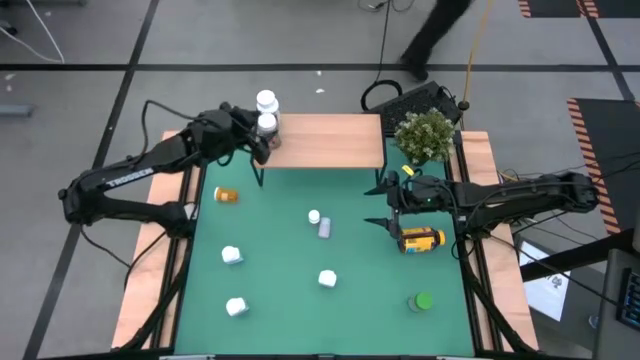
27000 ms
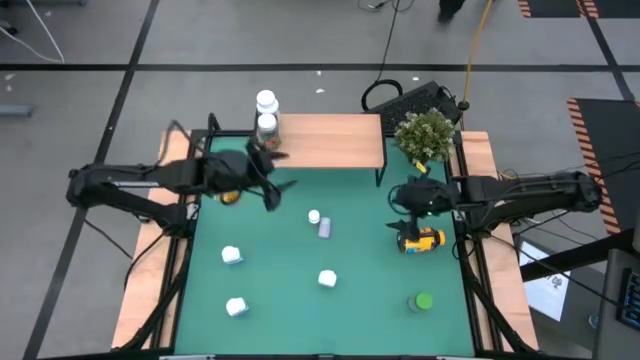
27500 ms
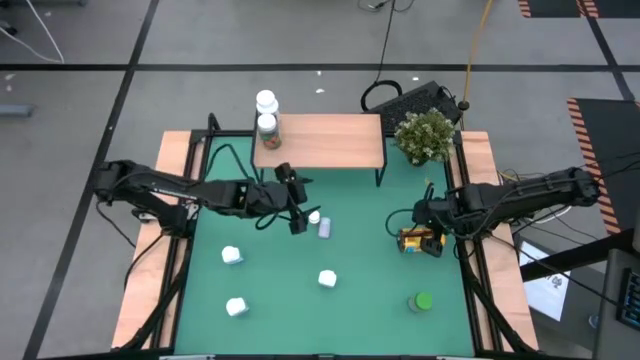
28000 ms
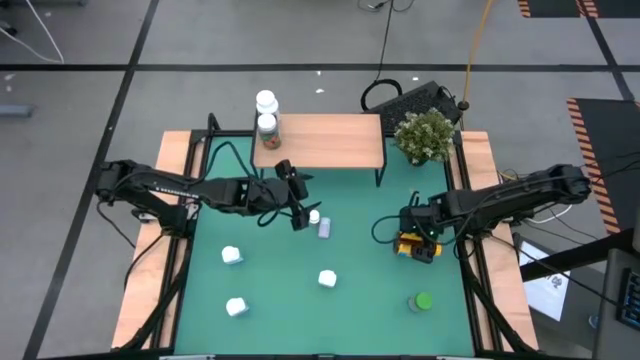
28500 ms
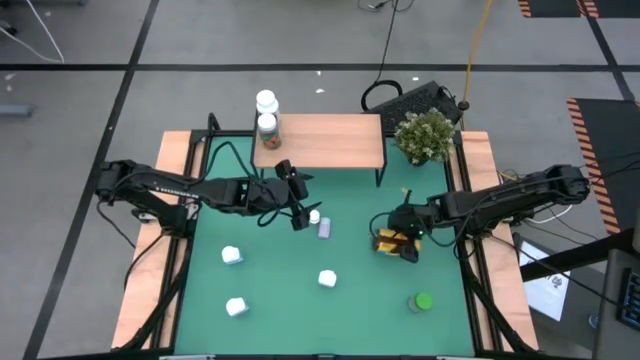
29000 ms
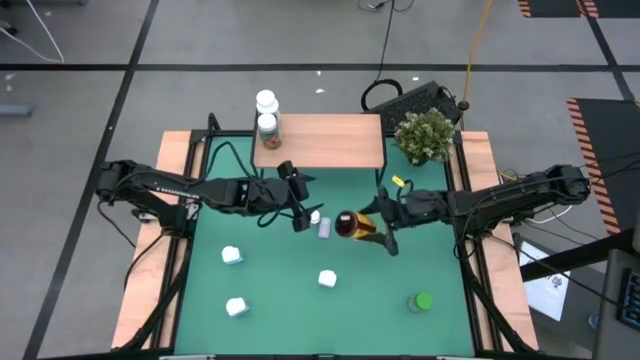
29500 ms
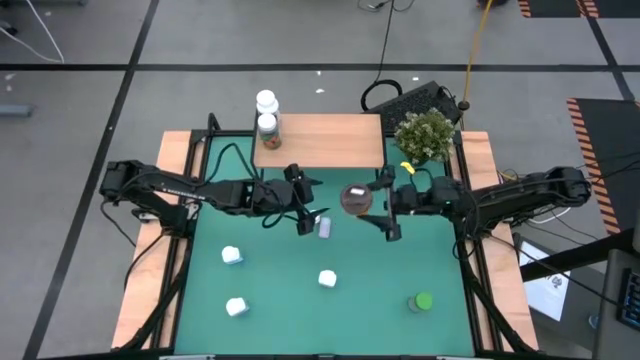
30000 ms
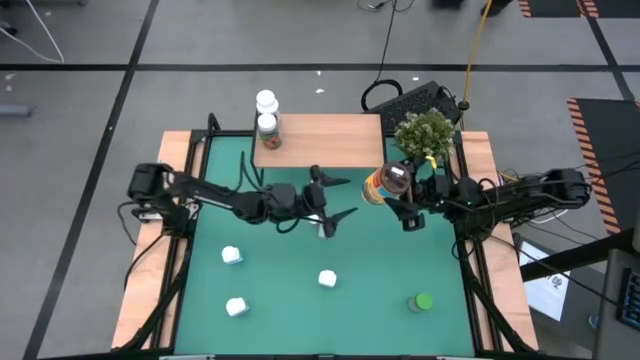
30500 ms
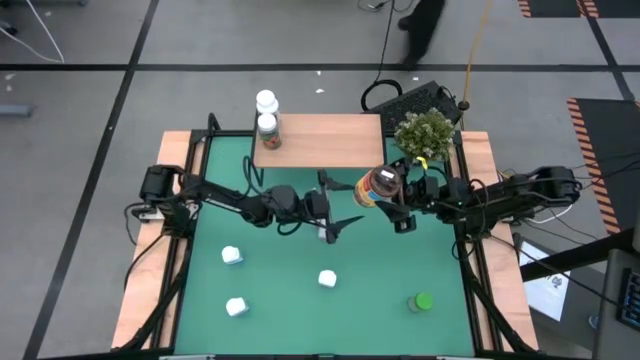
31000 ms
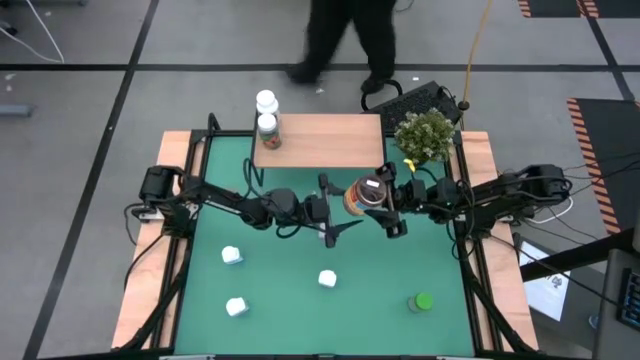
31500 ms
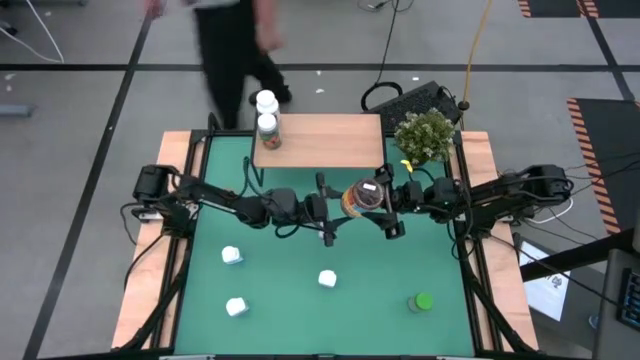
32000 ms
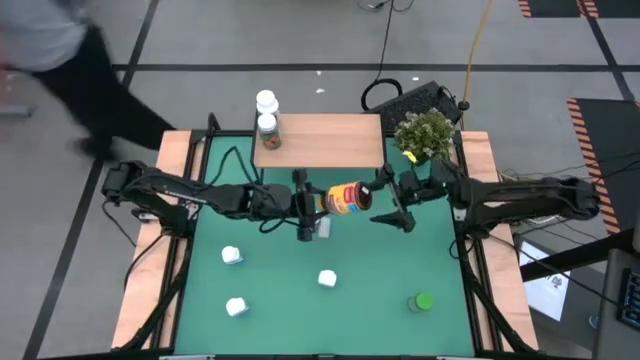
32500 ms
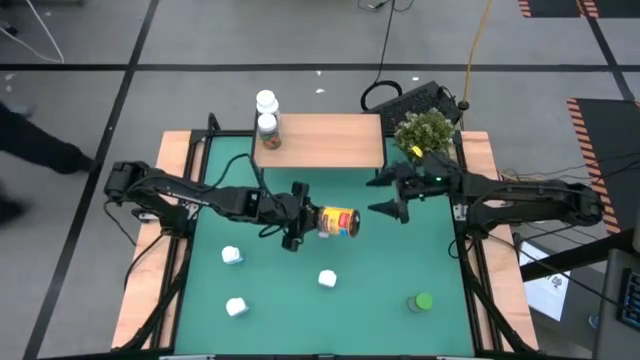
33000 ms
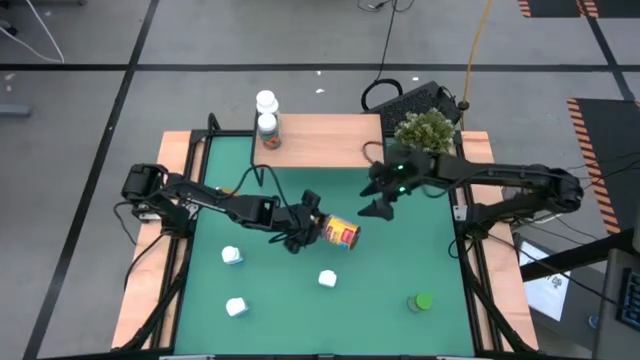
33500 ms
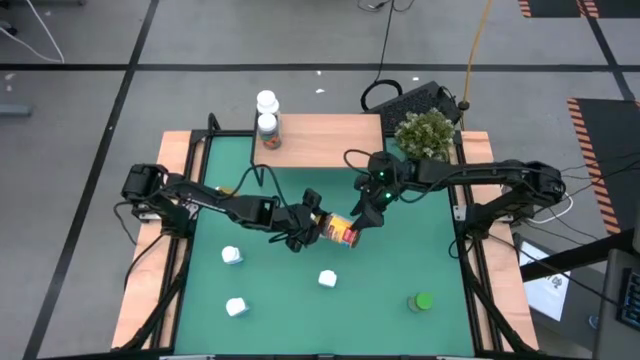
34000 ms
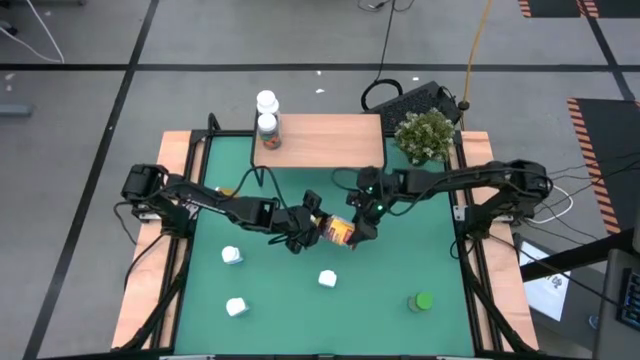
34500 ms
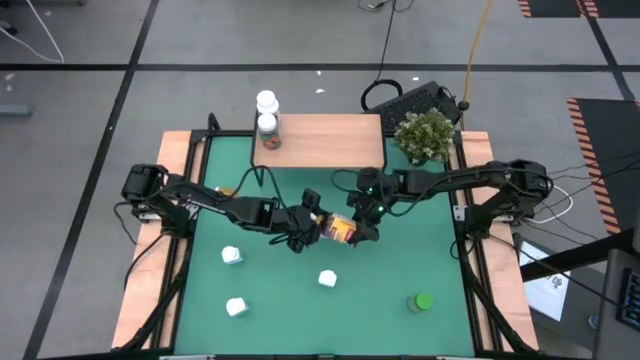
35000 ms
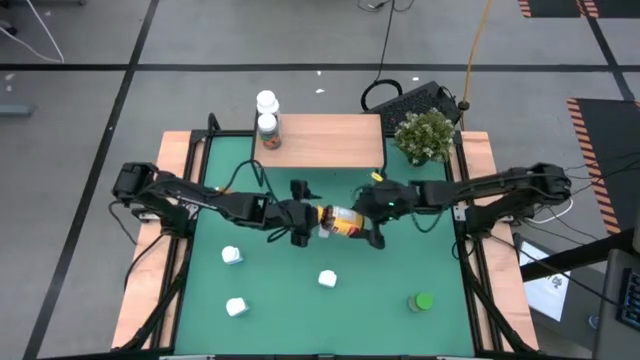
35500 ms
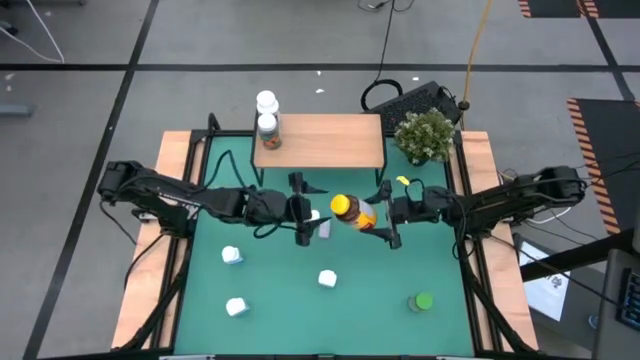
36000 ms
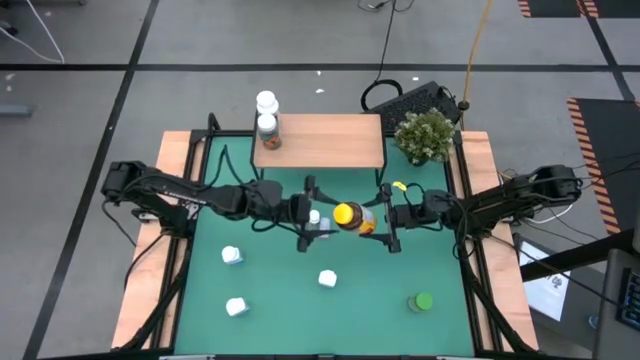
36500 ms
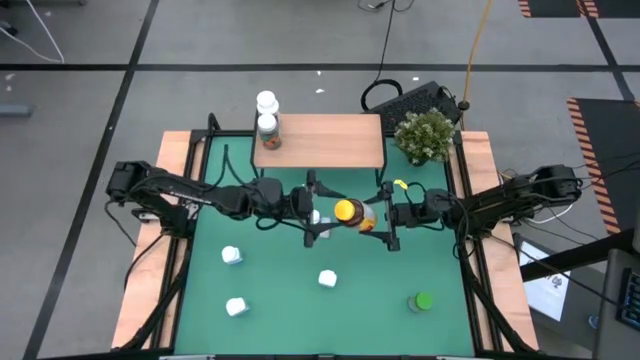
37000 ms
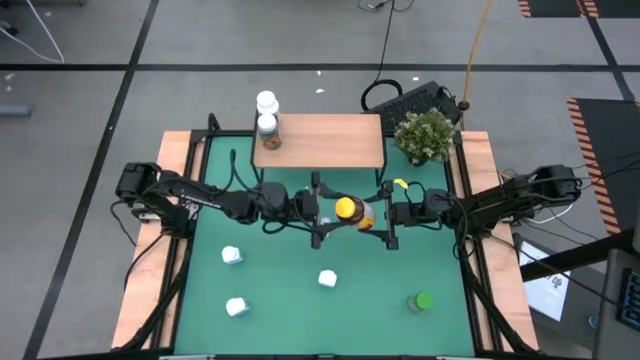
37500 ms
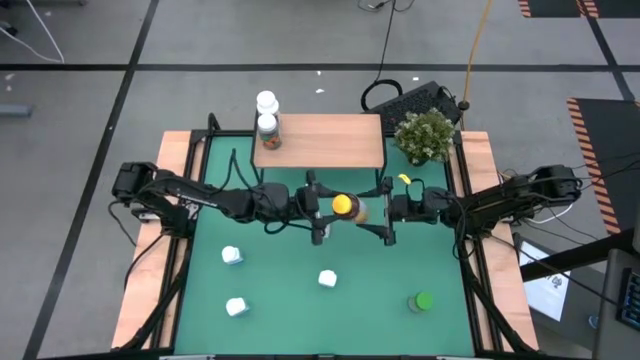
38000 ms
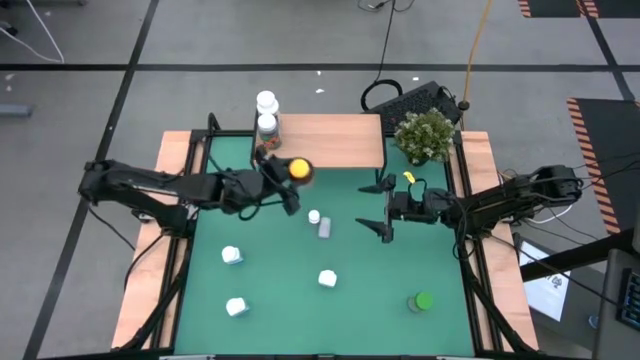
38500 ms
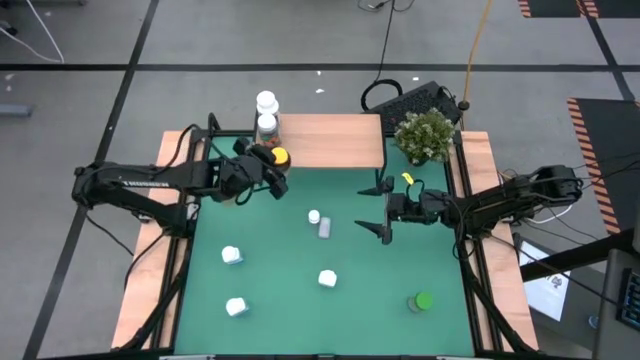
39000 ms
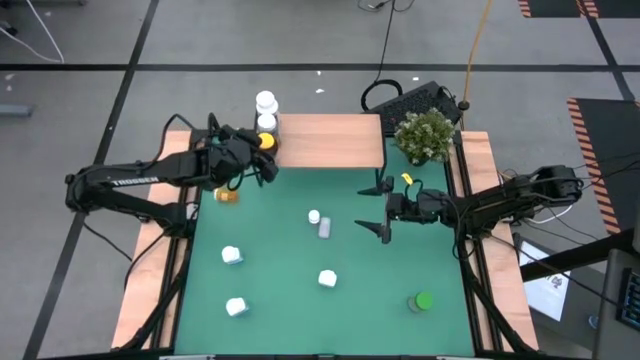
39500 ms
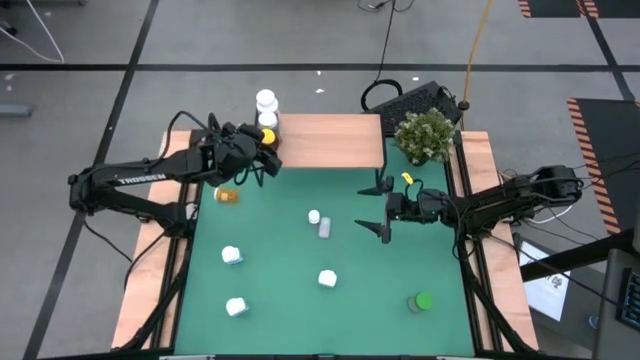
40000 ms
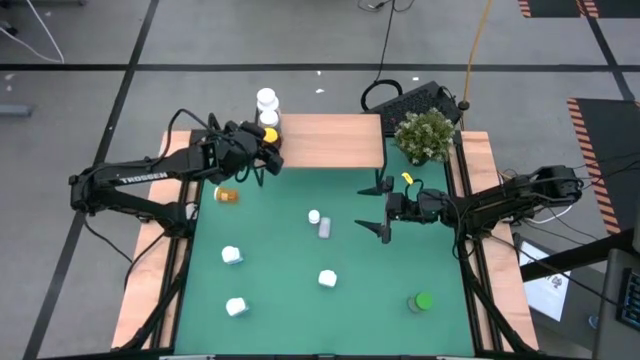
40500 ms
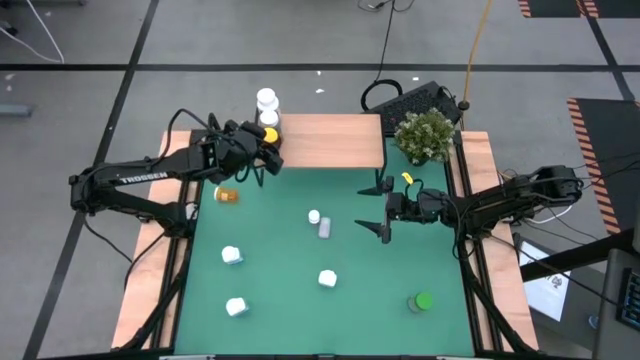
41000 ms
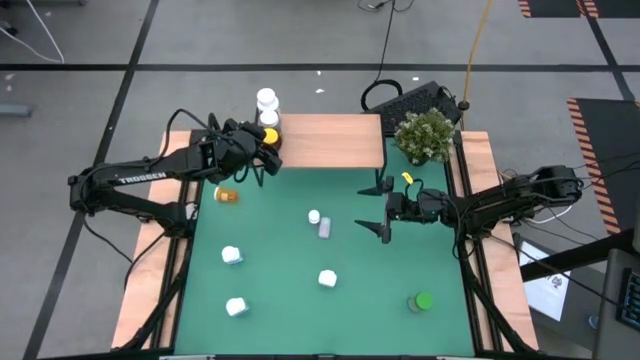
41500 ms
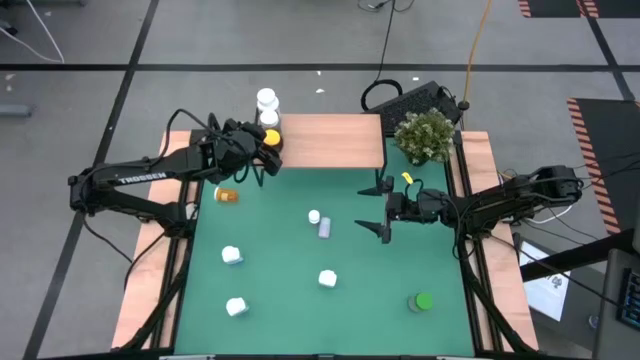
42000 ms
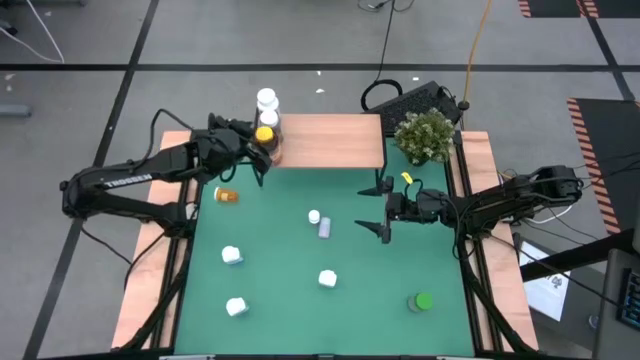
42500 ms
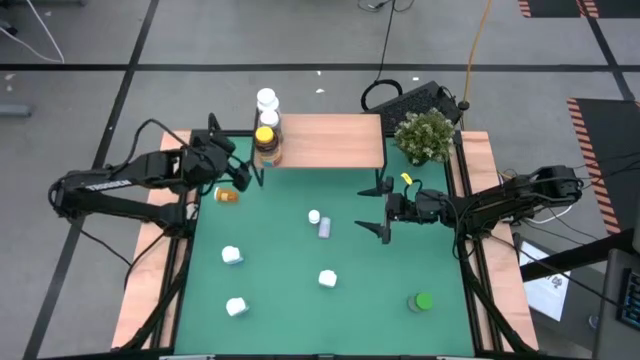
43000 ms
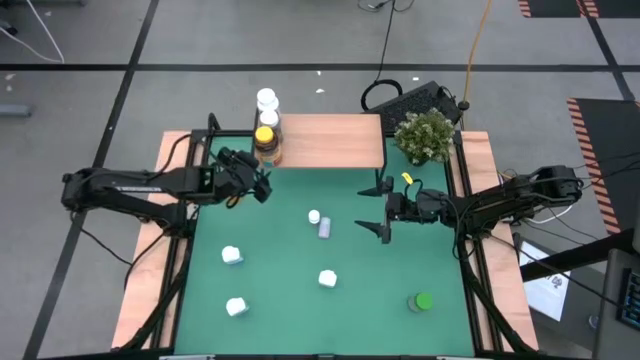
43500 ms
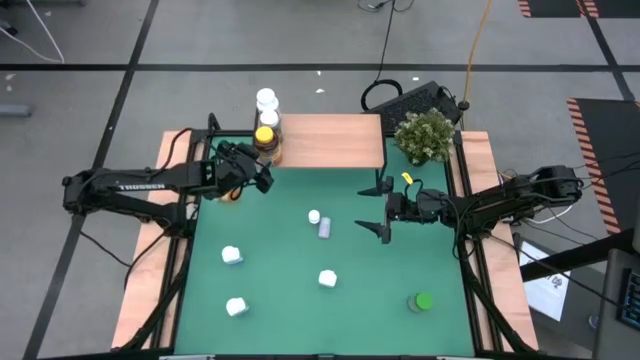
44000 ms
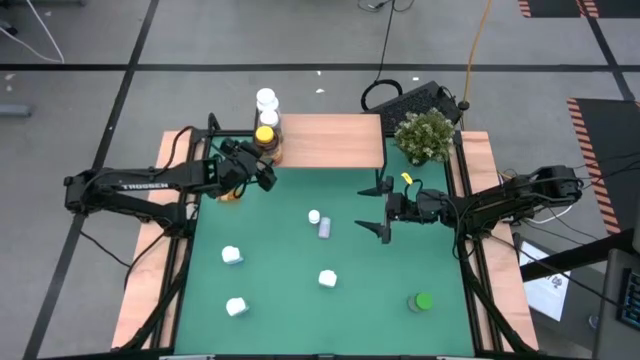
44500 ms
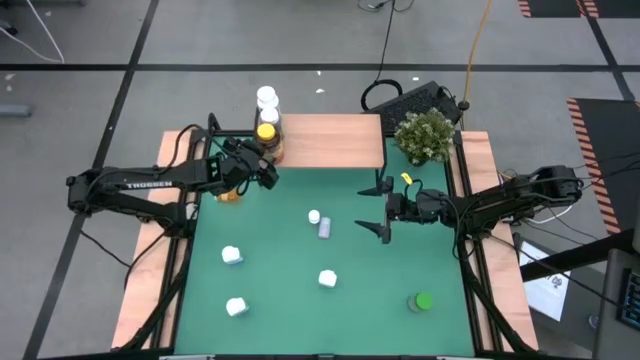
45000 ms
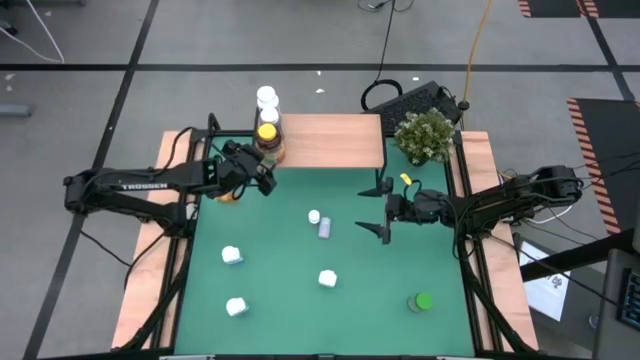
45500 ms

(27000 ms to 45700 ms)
Task: Pick and place medicine bottles onto shelf by color
Put the yellow pill bottle on the shelf

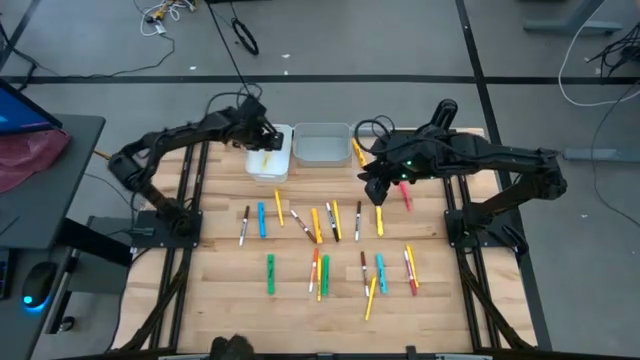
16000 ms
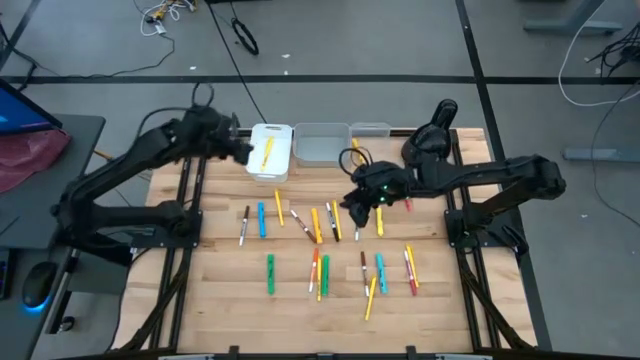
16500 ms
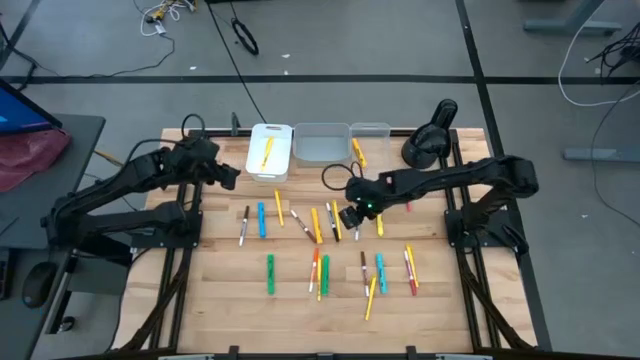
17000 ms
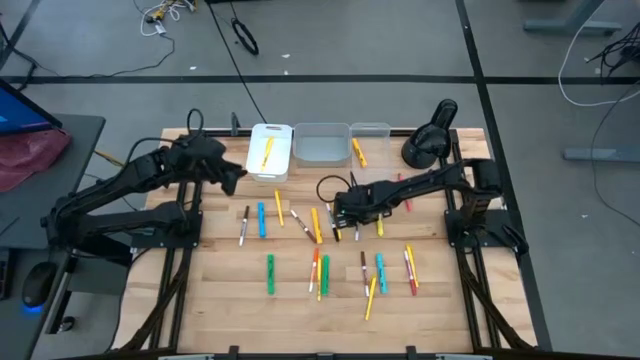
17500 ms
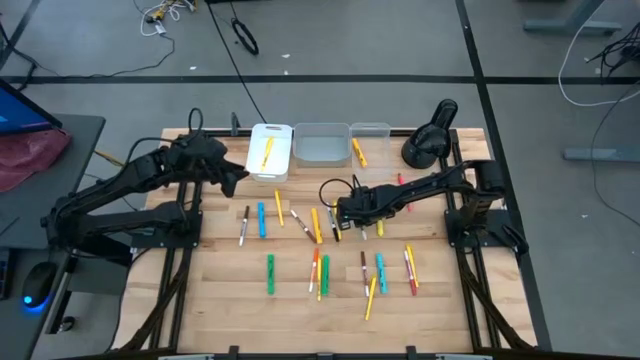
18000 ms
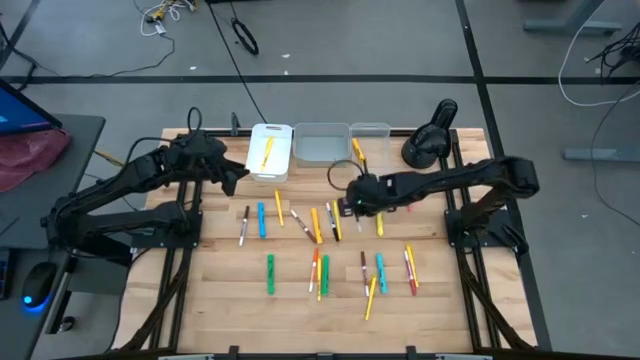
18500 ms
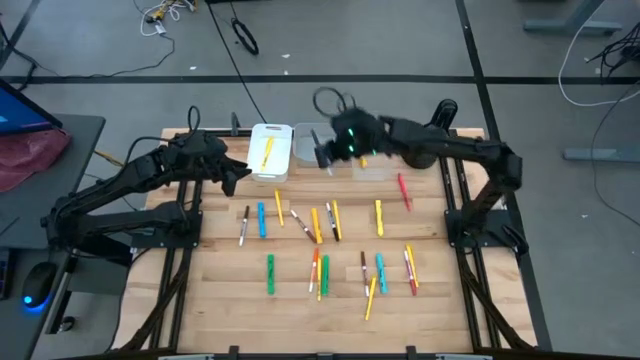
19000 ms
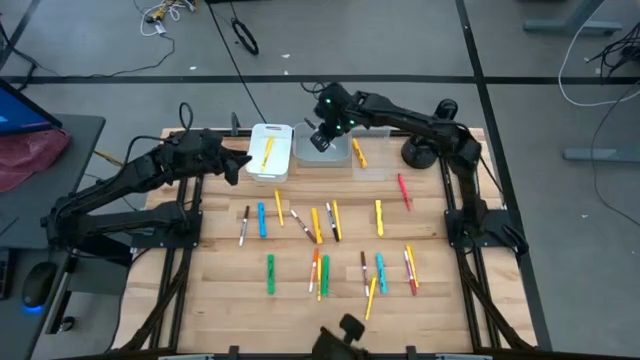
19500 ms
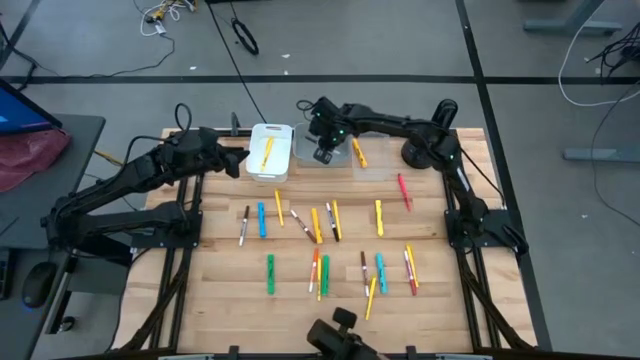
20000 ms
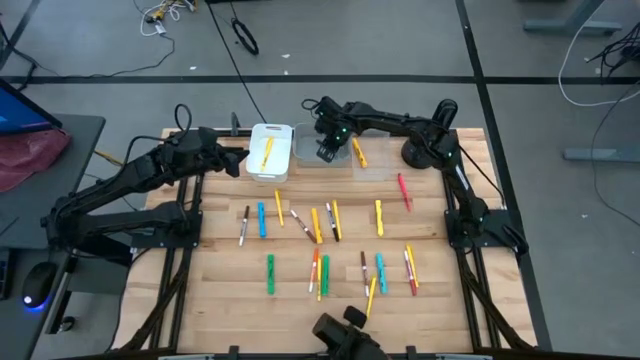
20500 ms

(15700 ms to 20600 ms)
Task: Pick & Place Markers
Put the brown marker pen into the gray bin
